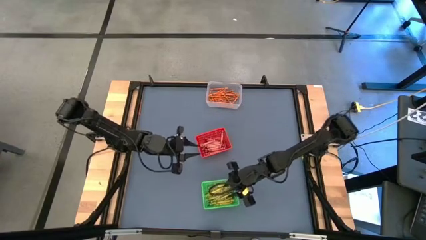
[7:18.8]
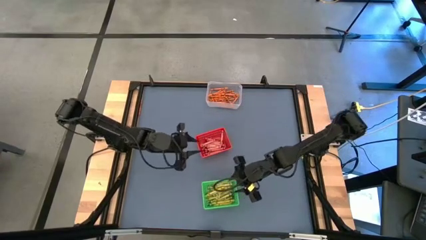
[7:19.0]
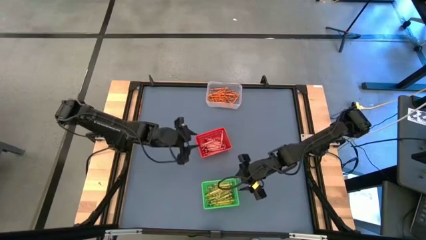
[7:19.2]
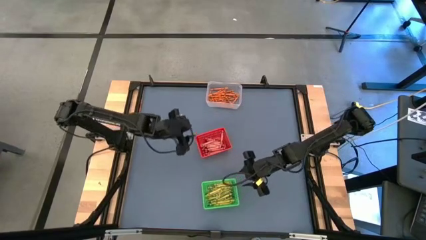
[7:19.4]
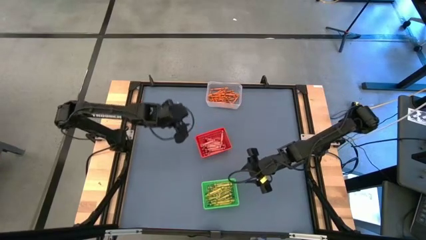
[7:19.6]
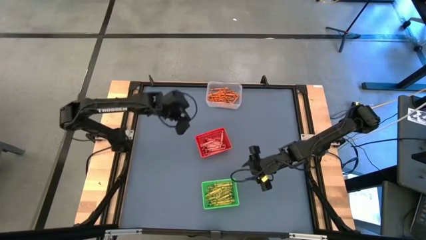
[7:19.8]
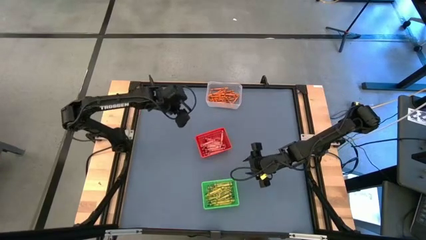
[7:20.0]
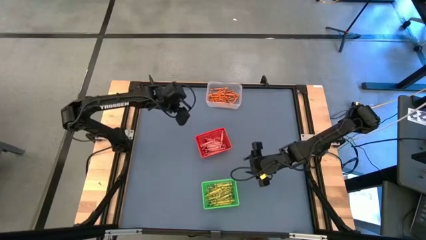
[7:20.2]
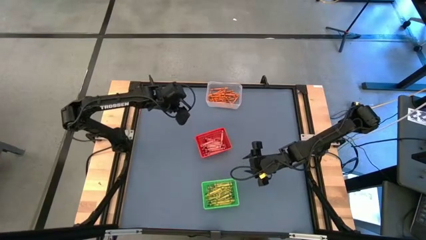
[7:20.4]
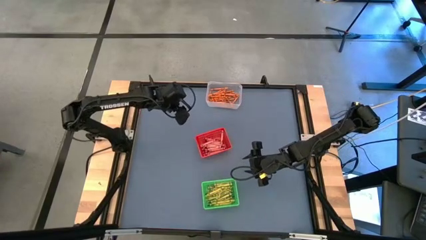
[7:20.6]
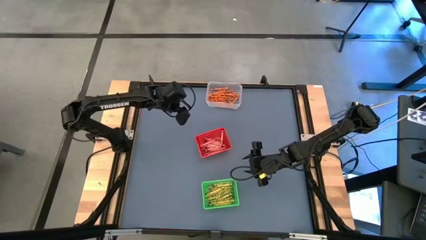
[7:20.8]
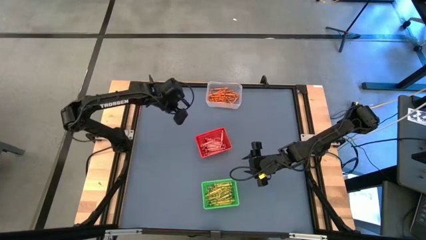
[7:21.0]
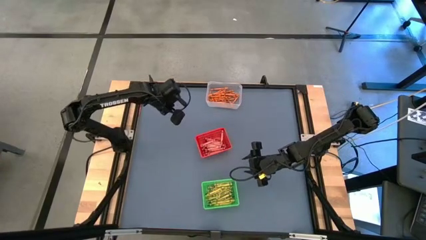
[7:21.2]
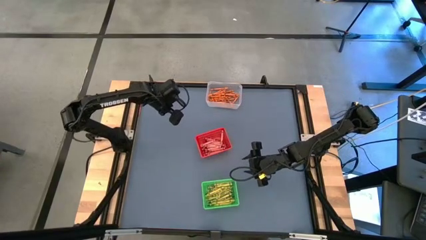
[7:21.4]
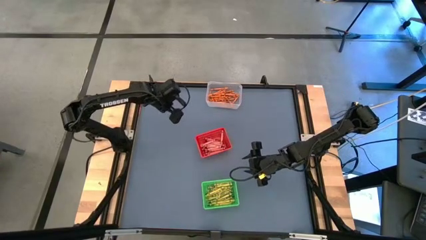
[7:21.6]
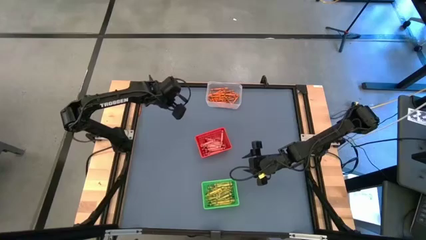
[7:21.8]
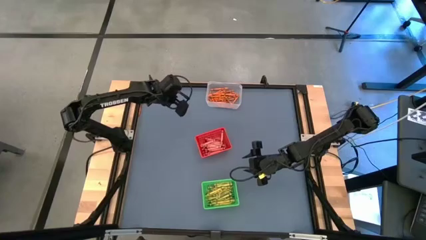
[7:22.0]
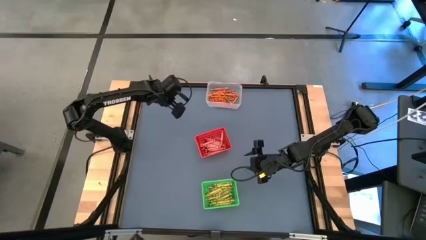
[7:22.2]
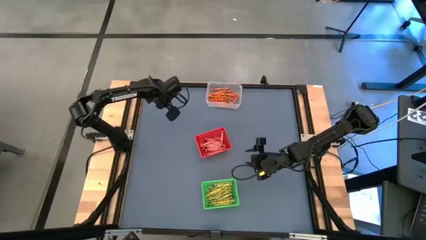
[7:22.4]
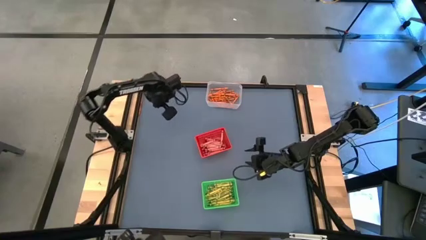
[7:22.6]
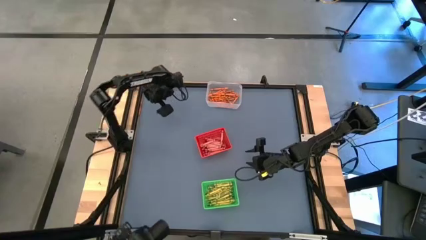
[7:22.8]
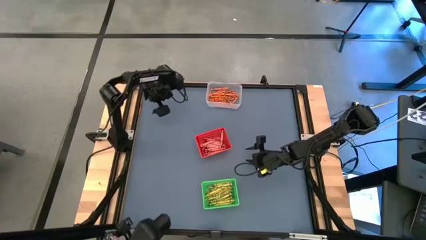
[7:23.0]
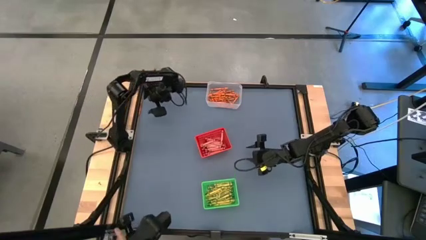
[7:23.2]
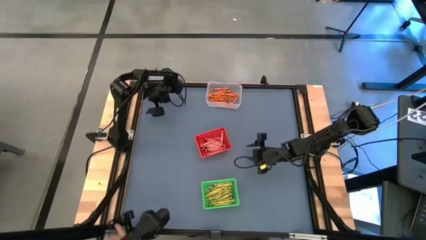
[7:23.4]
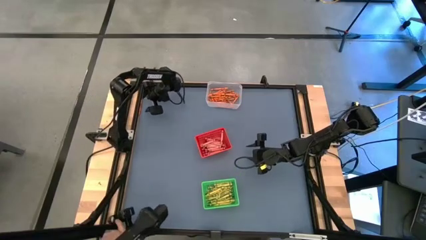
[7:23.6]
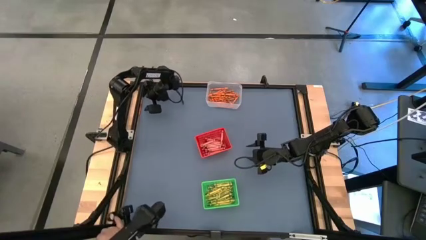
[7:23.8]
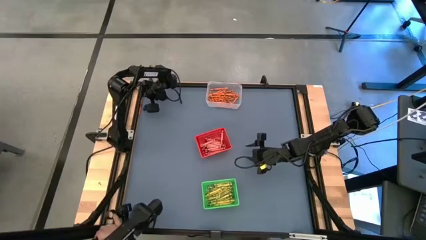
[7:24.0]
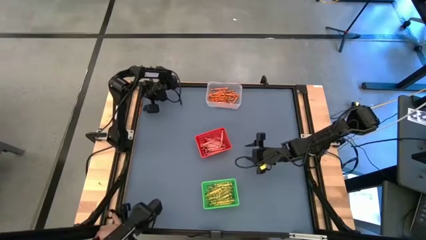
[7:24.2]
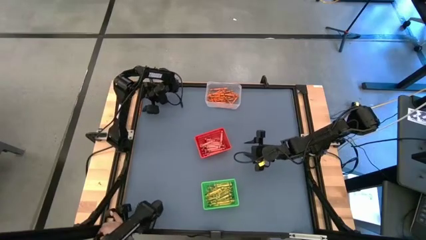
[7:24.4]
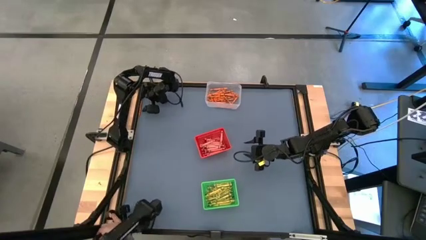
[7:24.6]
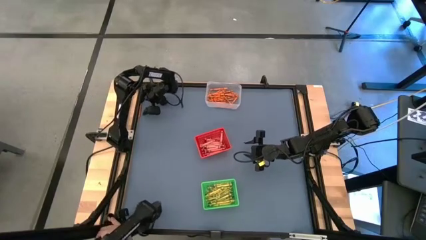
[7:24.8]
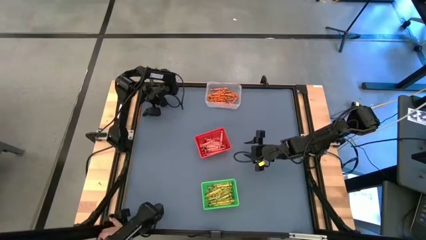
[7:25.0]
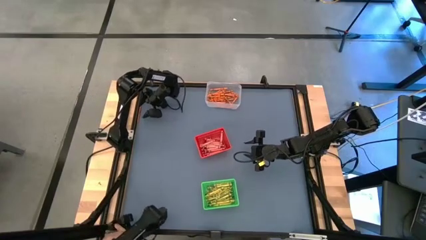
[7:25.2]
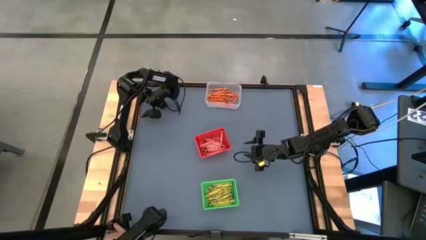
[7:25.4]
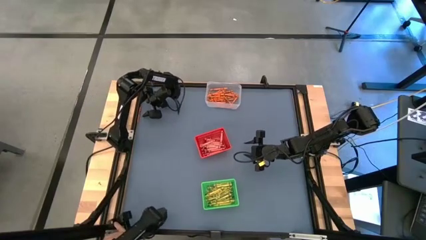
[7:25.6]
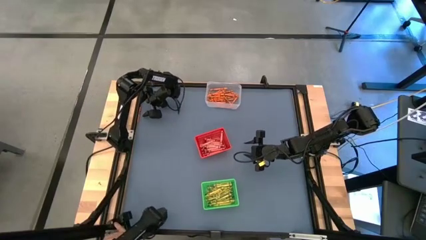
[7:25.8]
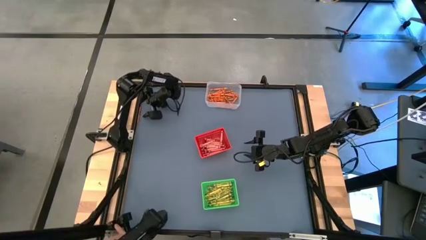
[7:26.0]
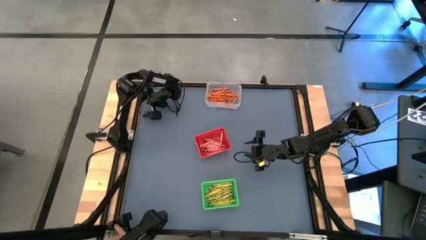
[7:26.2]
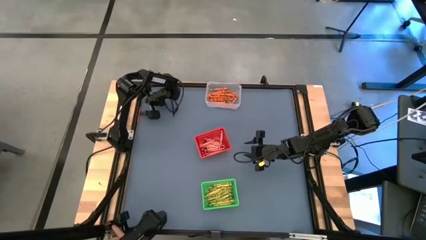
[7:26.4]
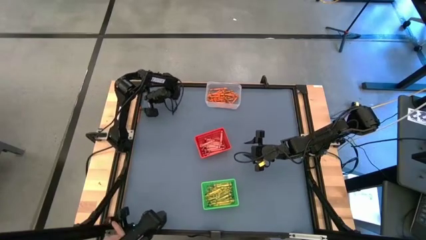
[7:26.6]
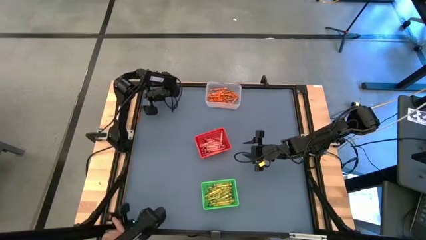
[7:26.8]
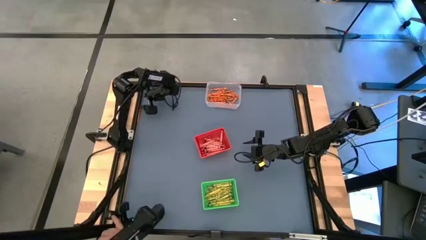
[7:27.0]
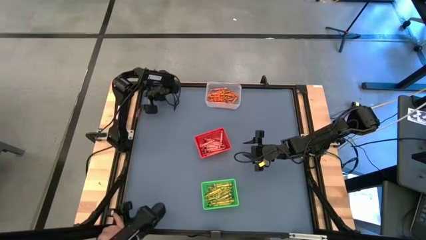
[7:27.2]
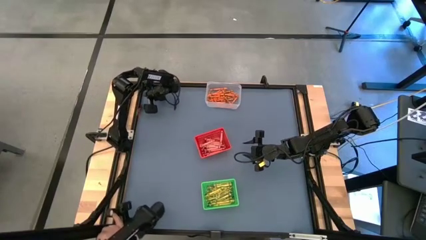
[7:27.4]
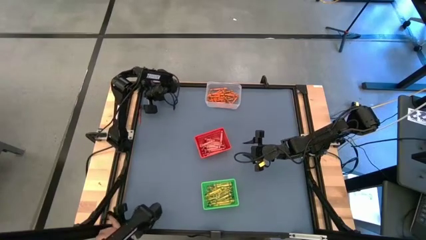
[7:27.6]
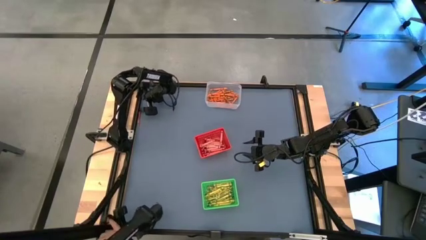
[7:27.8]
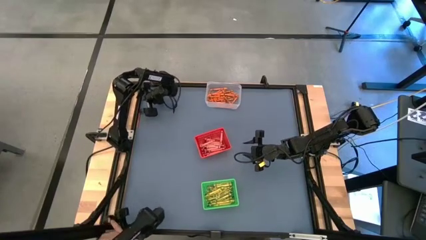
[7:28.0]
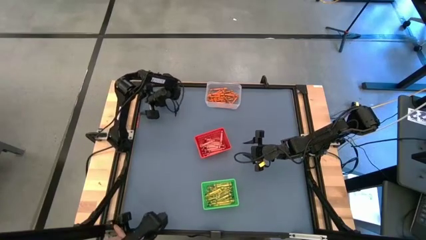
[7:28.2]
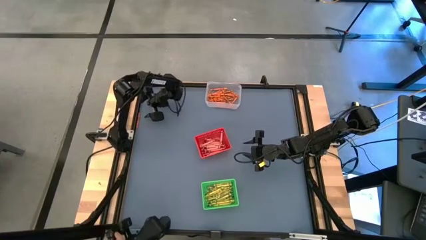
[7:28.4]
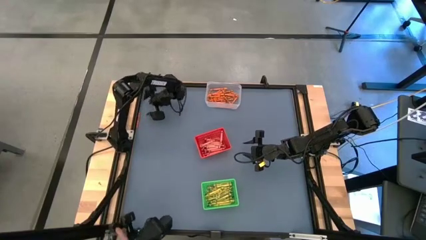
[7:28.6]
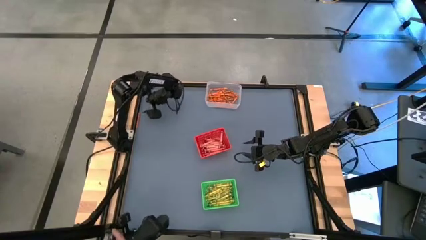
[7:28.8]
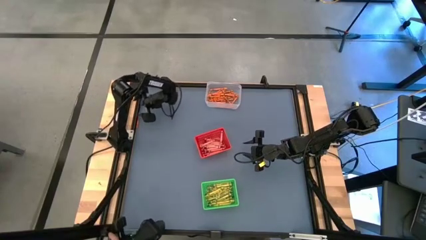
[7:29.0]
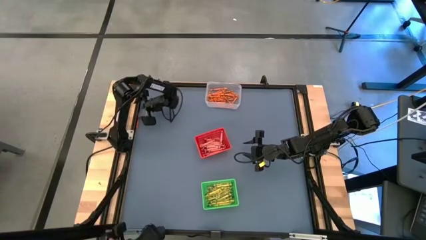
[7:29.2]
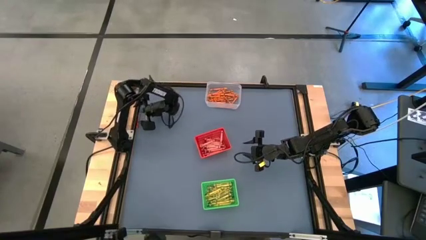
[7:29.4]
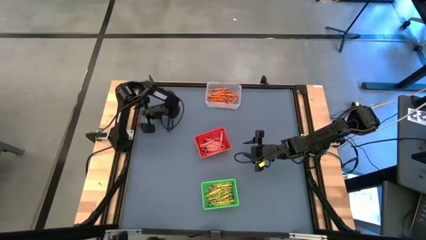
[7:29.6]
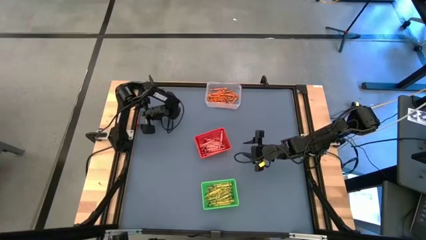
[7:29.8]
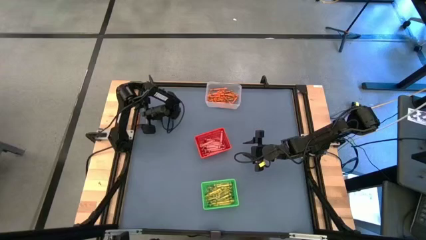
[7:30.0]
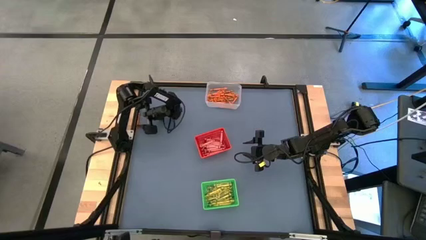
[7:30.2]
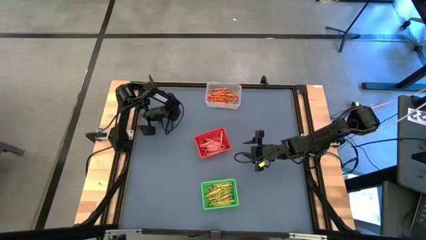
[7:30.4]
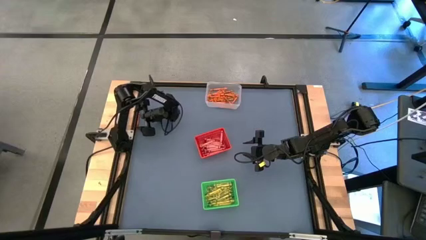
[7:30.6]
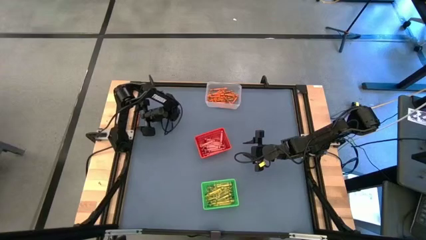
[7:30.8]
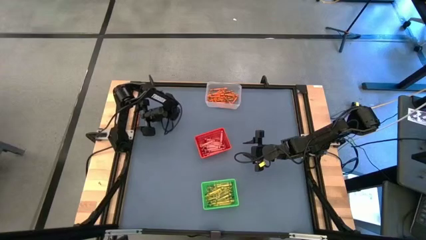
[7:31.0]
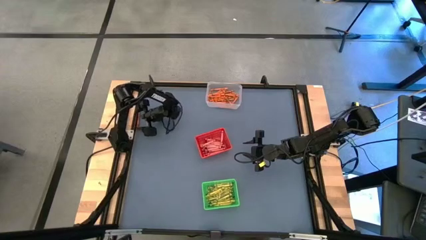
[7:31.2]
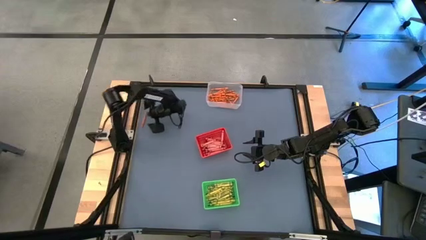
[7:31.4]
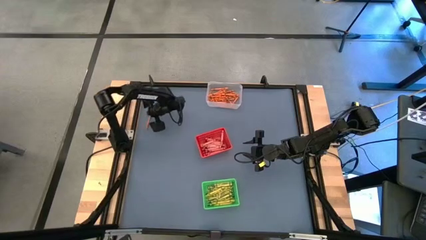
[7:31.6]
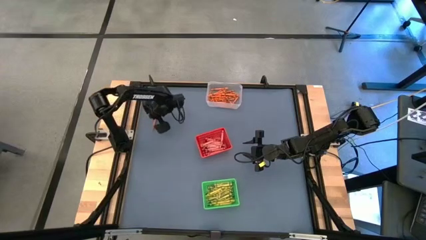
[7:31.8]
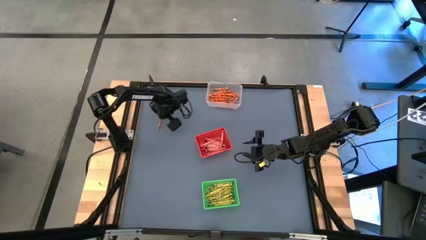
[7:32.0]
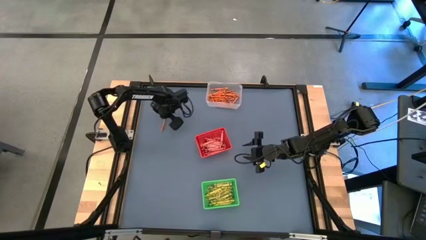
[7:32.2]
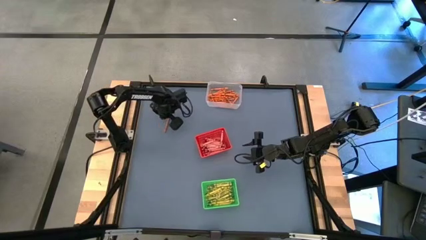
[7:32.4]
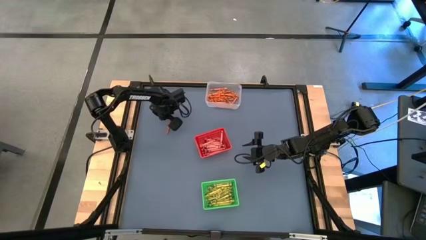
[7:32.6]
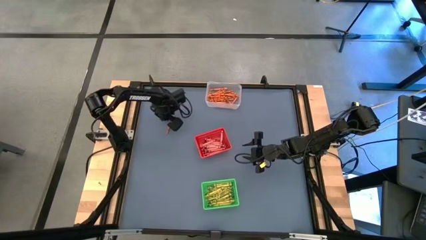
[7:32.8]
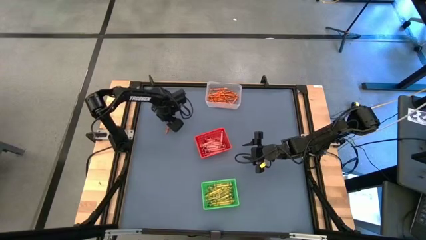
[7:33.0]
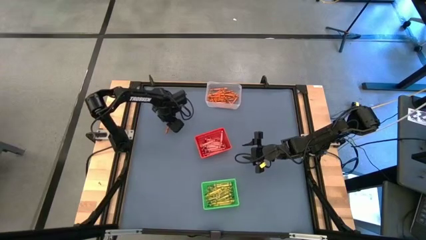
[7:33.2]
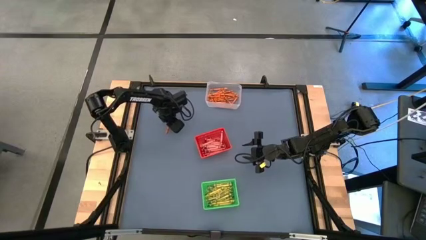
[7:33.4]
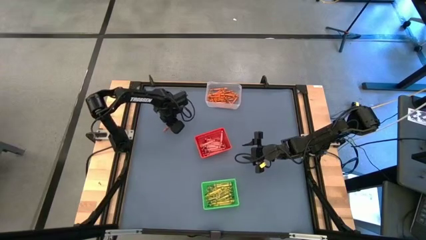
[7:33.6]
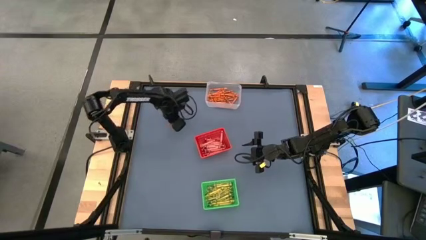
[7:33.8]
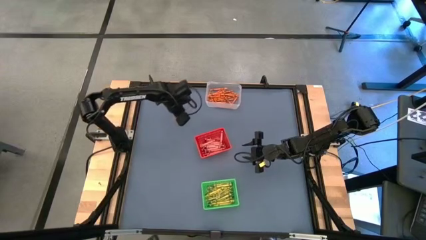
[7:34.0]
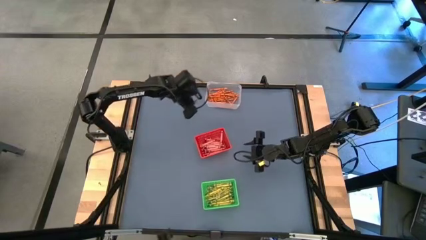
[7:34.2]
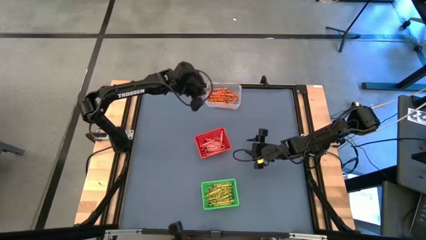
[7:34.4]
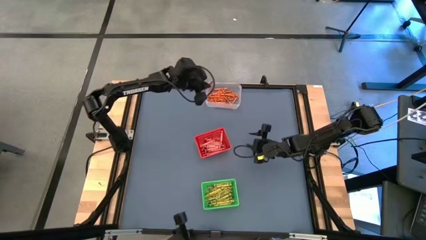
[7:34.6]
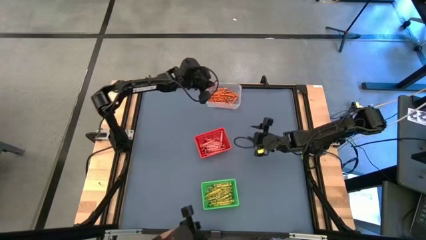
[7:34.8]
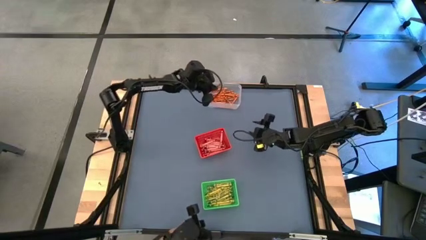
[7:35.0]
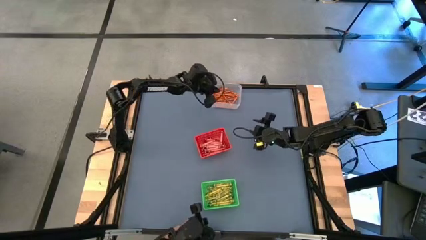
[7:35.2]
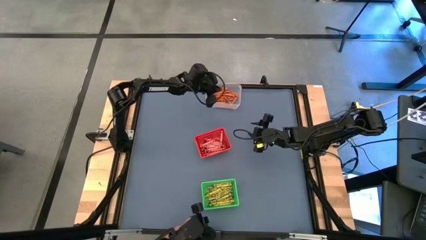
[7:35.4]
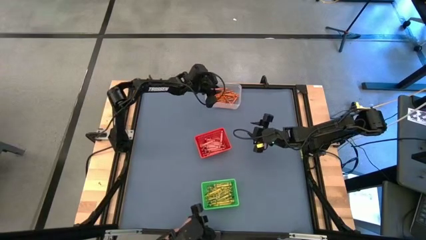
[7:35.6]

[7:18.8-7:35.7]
Task: Sort crayons
Put the orange crayon into the transparent bin
